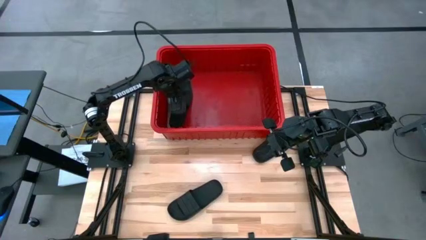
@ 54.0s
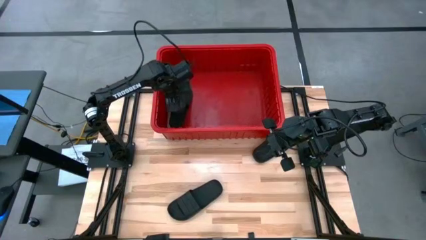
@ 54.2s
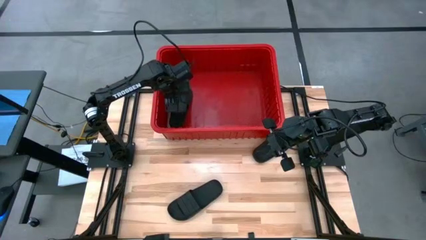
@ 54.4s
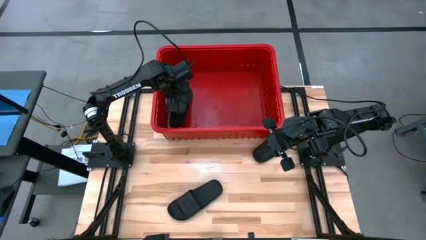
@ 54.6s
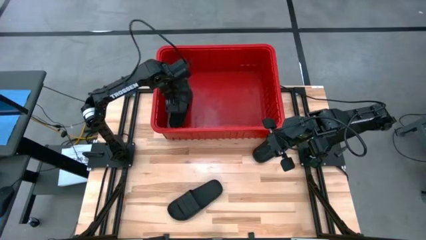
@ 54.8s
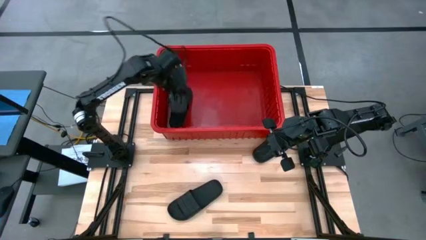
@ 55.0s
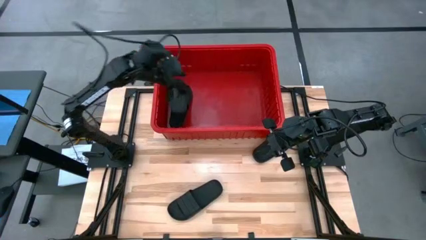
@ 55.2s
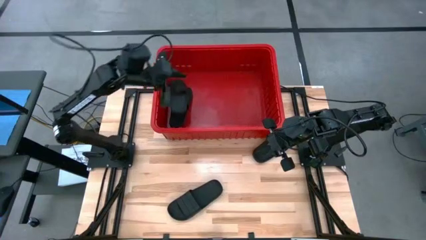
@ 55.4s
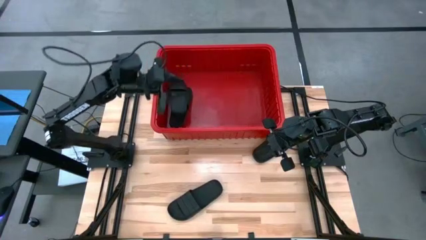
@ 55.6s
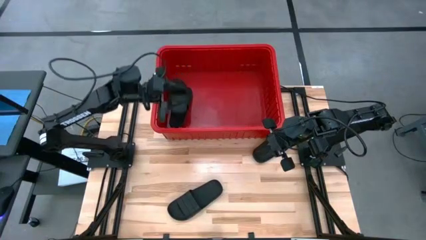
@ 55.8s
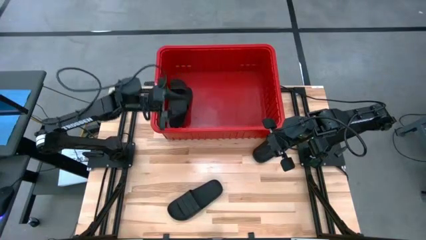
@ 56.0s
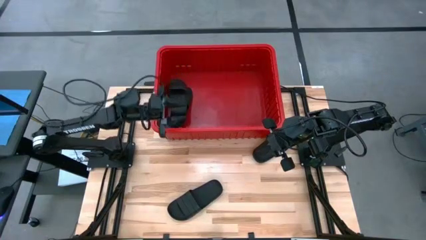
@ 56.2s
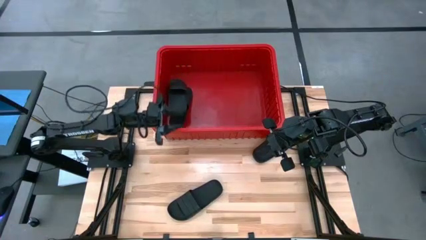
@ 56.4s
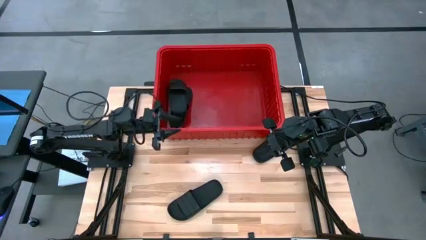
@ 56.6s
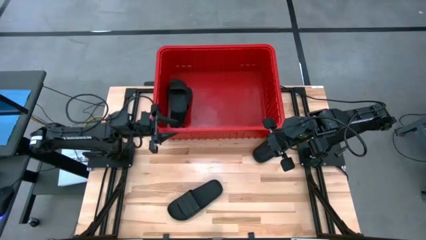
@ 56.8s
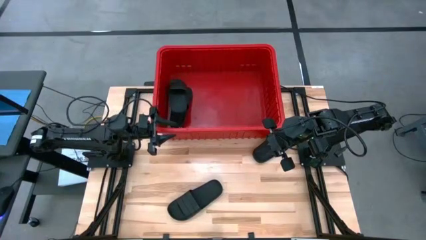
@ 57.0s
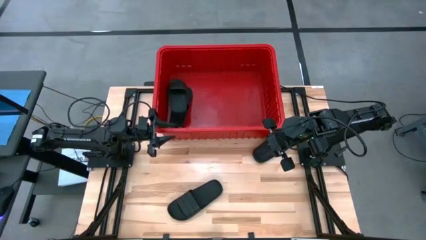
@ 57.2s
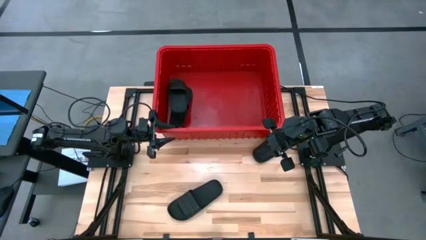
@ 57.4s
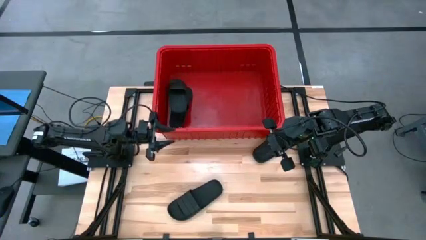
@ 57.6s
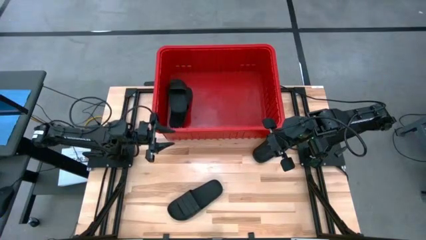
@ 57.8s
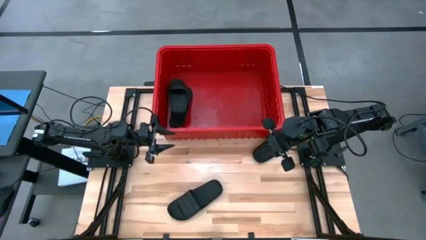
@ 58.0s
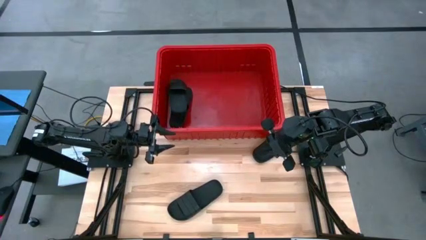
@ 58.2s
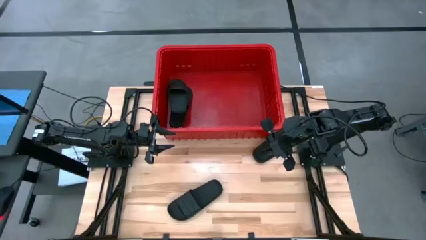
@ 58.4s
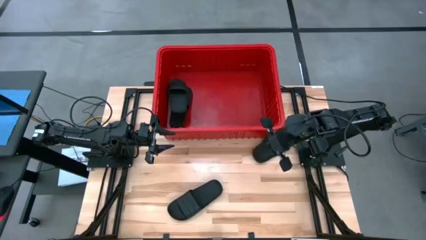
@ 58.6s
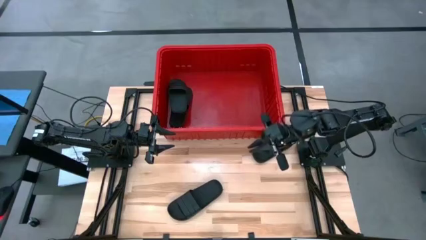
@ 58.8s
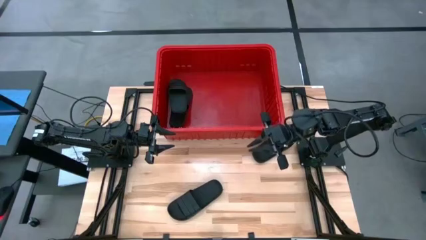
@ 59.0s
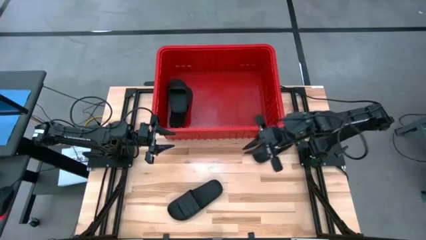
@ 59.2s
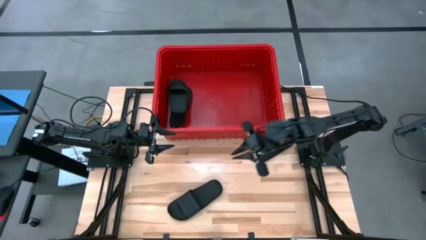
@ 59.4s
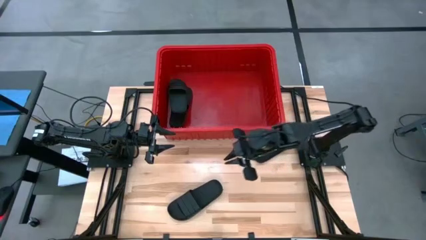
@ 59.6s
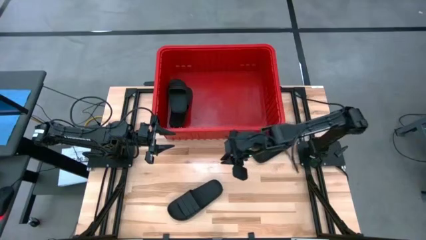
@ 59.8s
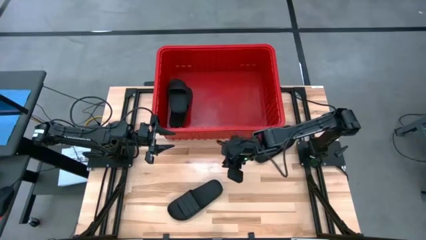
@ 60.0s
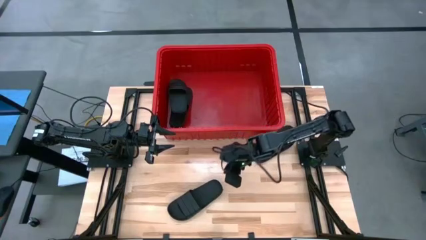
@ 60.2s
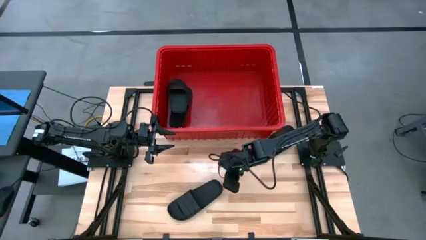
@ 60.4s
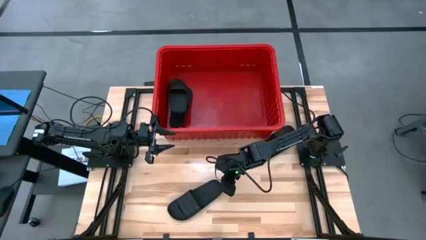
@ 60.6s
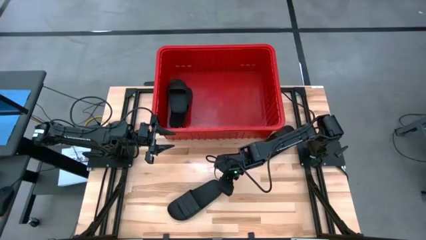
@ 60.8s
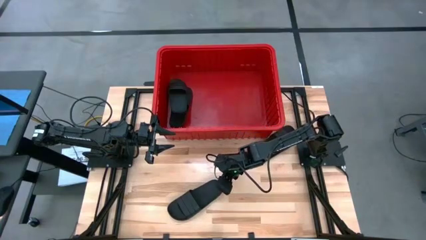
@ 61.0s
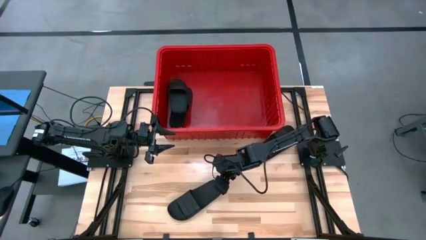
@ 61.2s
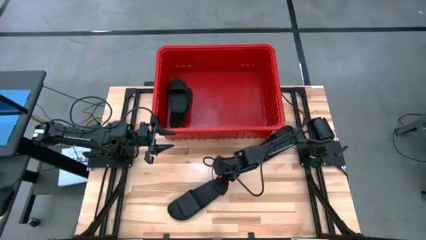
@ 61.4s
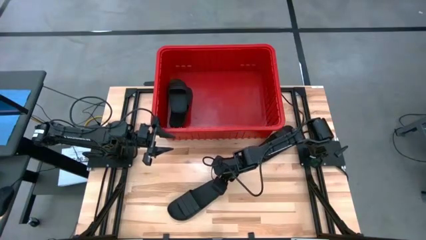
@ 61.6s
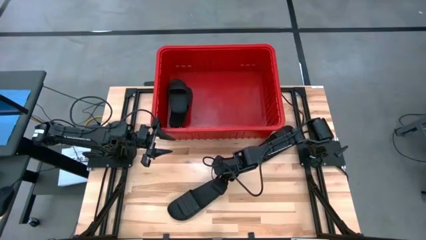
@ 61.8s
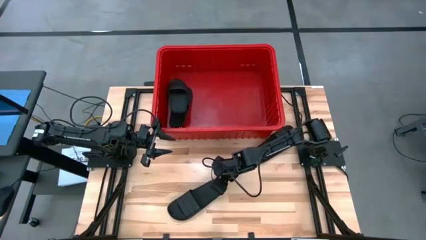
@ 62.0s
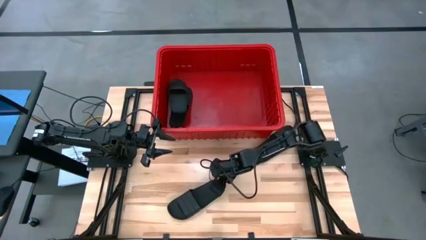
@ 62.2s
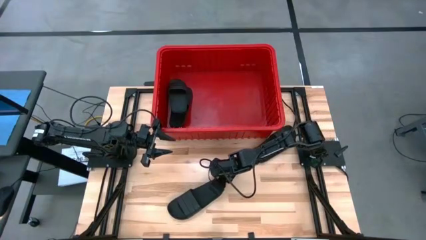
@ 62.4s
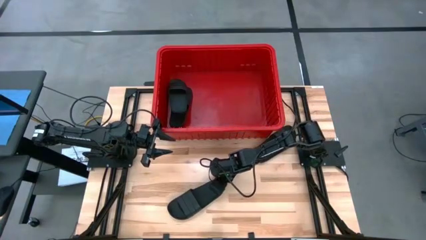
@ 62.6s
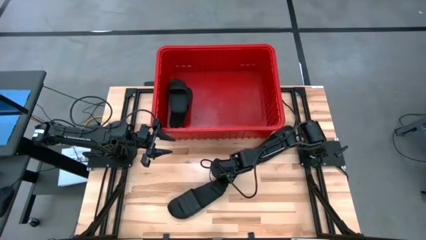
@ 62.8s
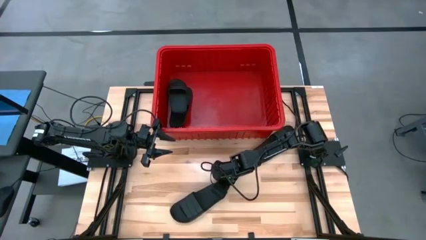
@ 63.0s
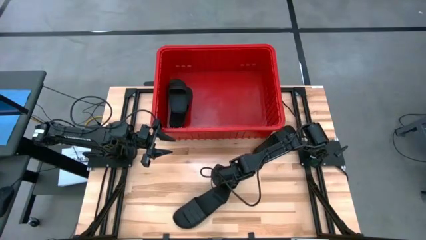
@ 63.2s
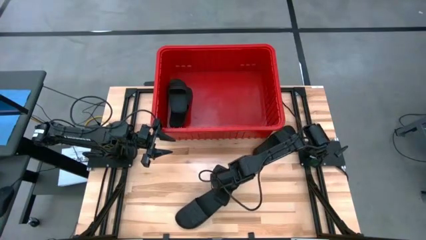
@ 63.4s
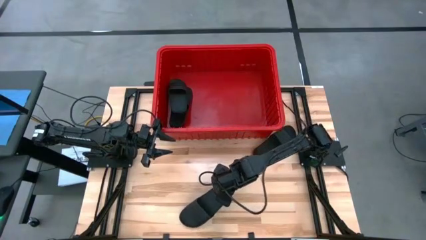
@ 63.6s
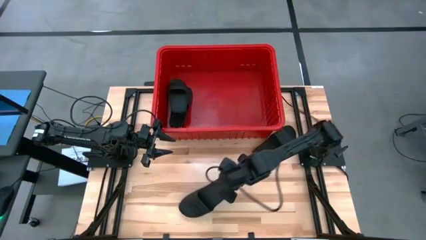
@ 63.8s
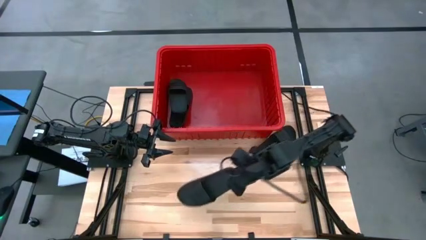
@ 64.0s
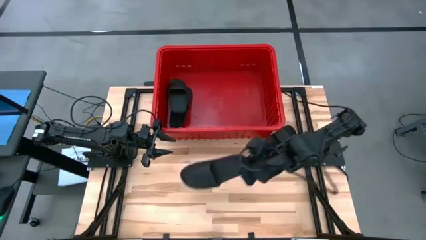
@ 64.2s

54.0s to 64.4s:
Task: Pick and place slides into bin
Put the left slide into the bin next to the other stacked slides

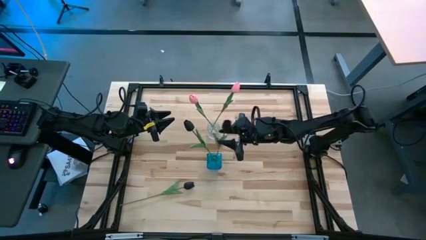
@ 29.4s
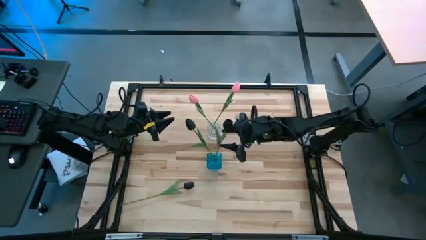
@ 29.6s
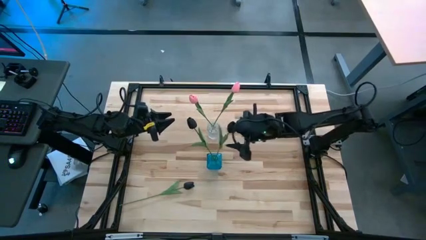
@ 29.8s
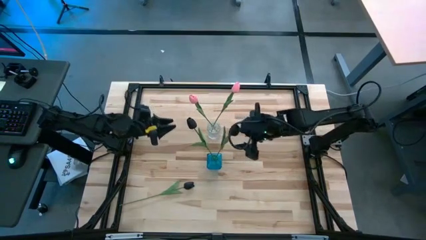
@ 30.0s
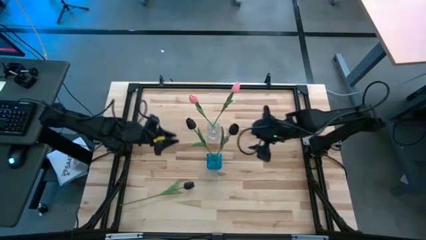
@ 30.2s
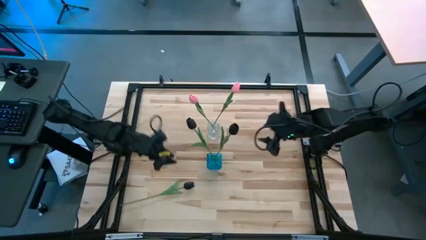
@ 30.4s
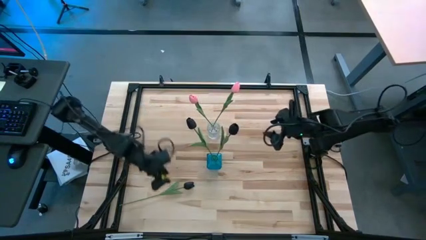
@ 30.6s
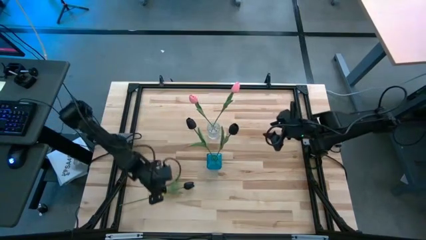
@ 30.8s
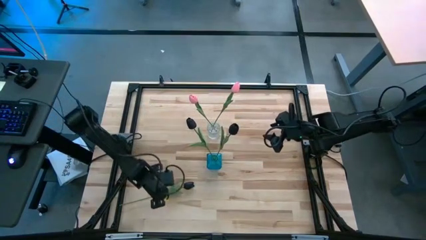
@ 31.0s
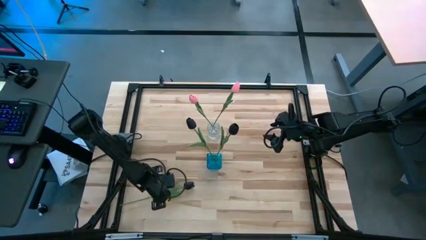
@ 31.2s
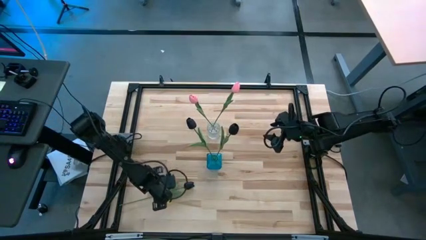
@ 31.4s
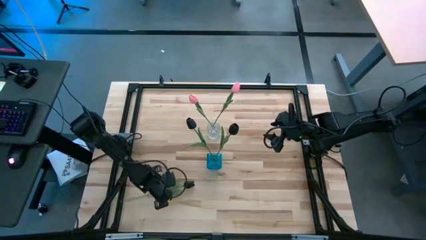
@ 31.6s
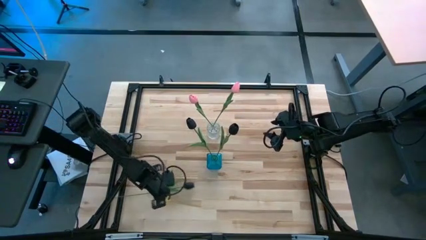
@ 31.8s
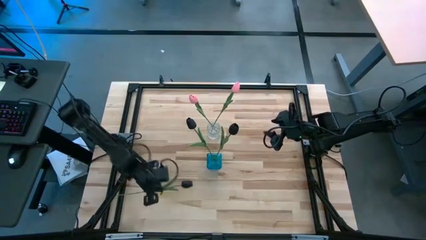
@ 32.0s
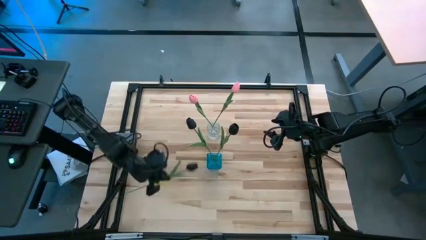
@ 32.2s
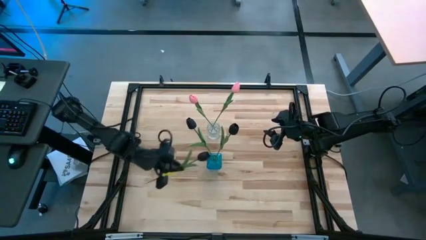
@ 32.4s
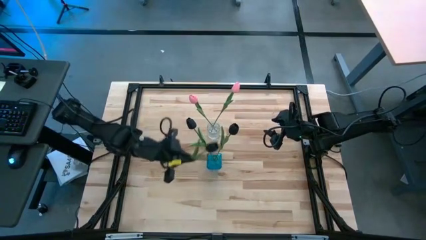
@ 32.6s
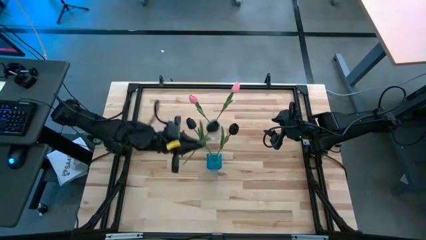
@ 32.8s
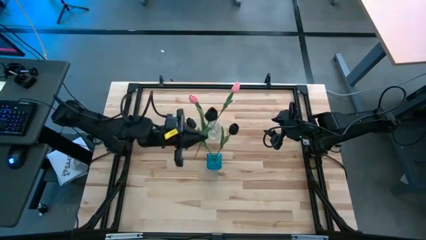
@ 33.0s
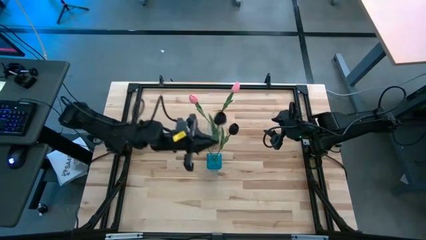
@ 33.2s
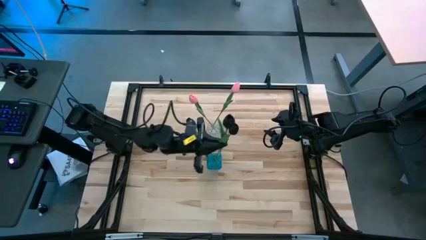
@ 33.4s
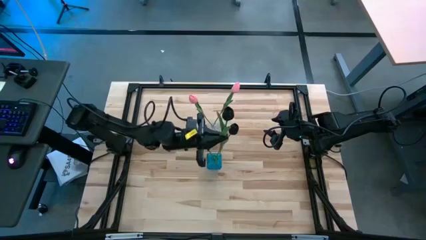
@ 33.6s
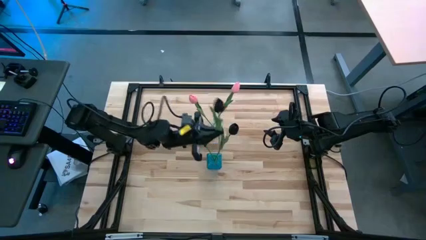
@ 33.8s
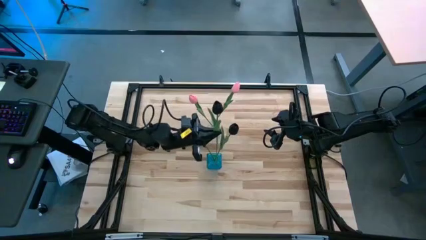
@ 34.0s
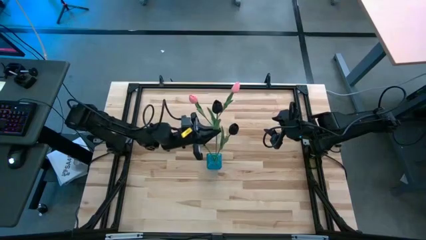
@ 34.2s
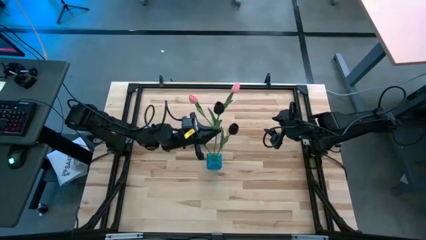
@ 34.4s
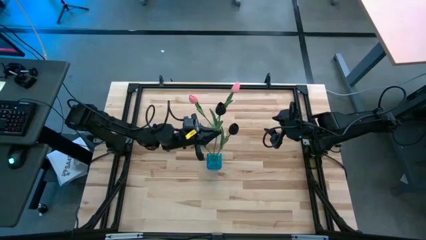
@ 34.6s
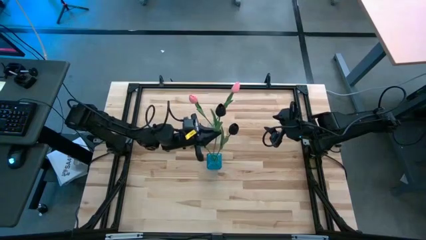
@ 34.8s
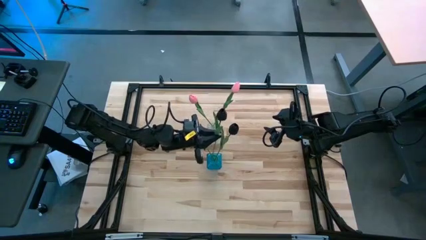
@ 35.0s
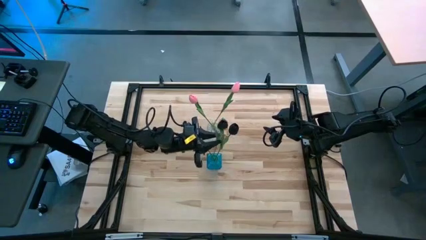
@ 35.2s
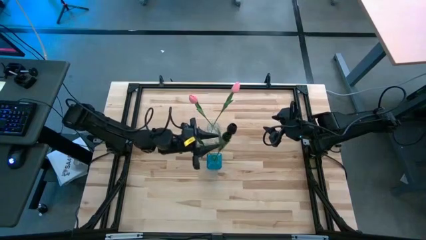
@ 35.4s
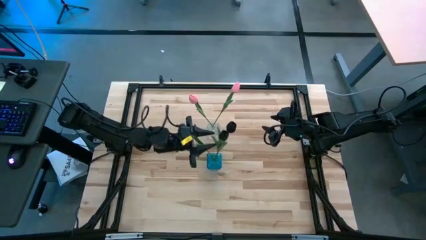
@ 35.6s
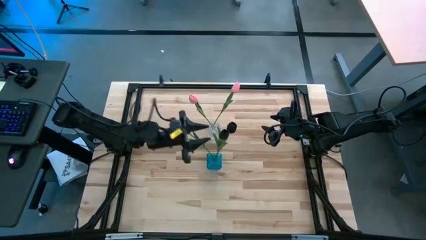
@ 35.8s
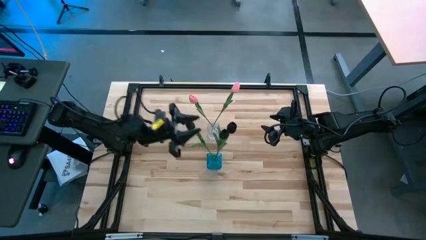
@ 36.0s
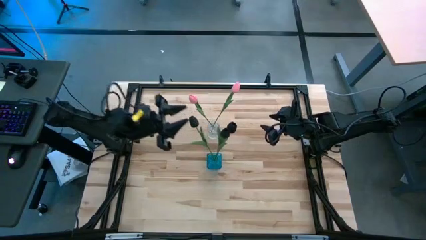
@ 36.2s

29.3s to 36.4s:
Task: Sort flowers into vase by color
Put the black tulip into the blue vase
